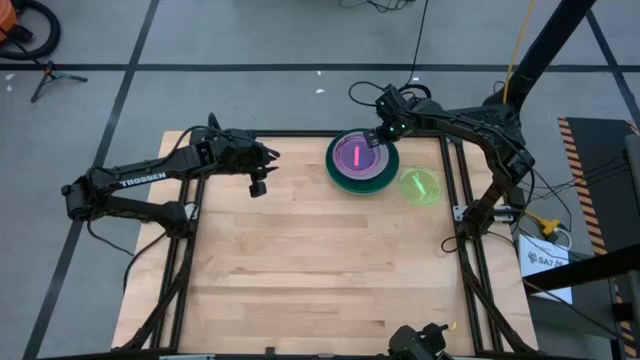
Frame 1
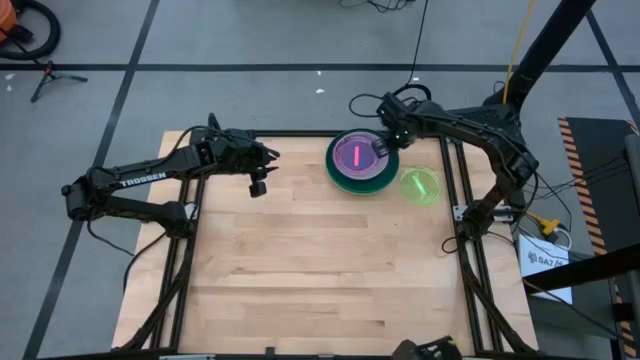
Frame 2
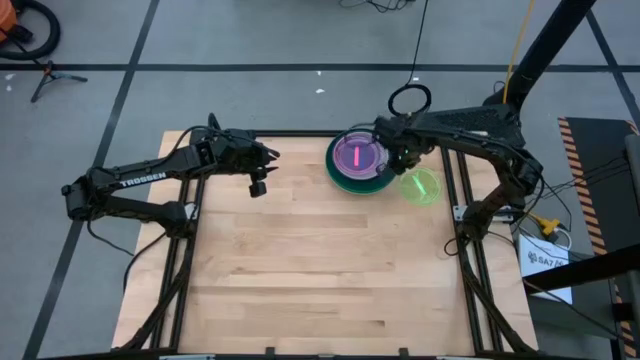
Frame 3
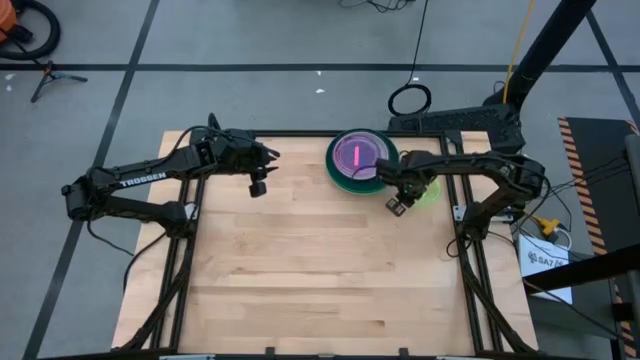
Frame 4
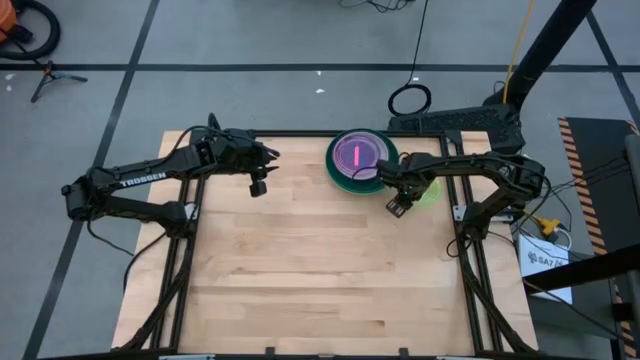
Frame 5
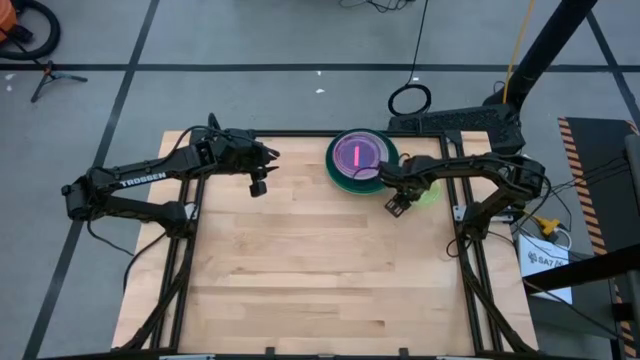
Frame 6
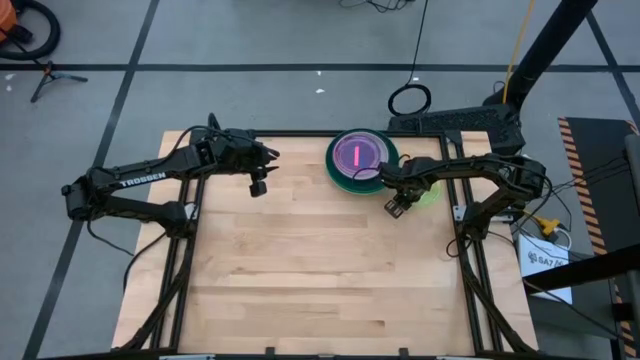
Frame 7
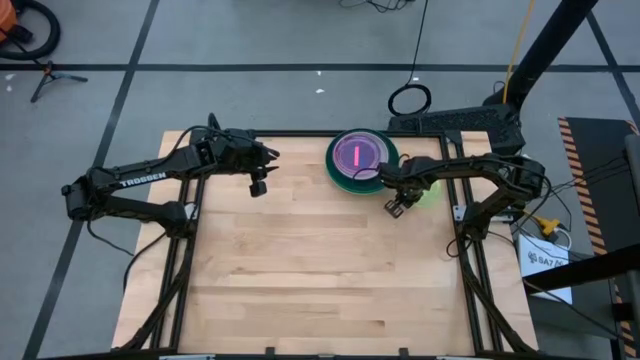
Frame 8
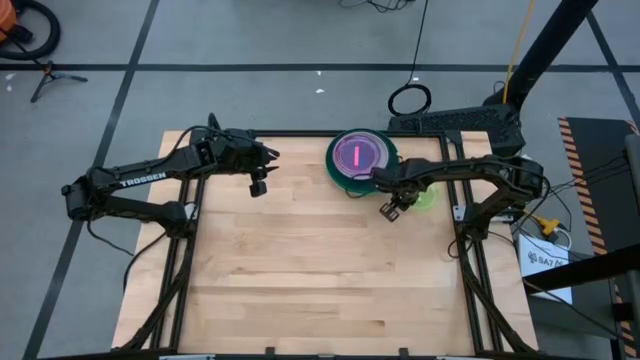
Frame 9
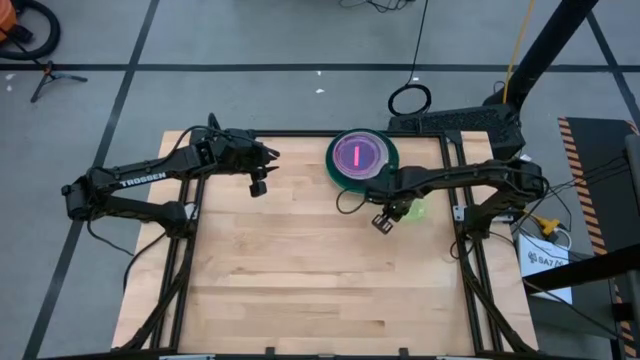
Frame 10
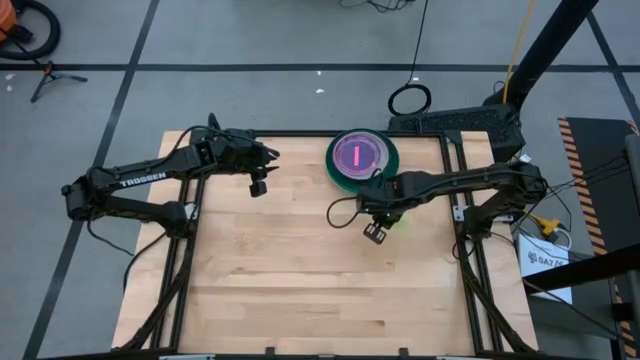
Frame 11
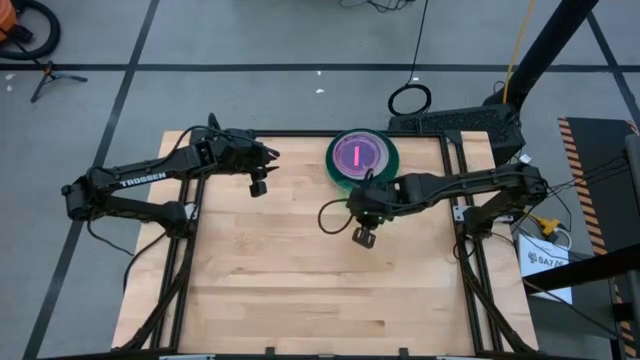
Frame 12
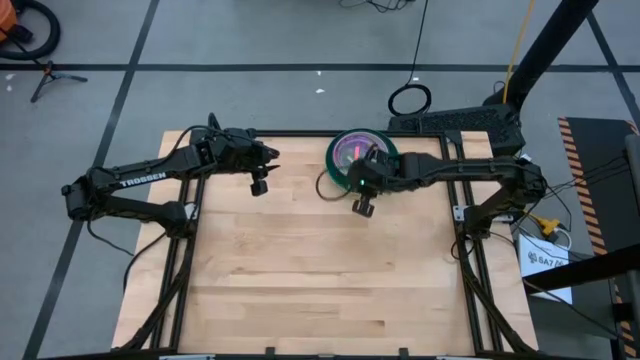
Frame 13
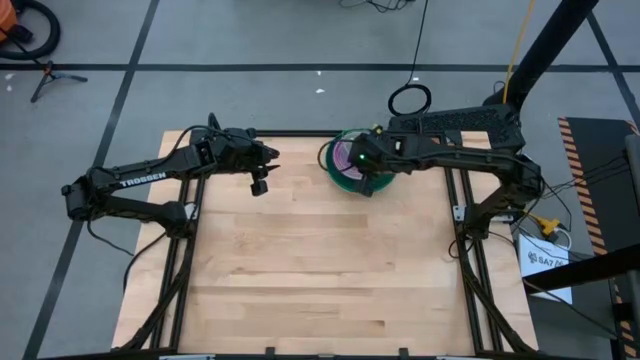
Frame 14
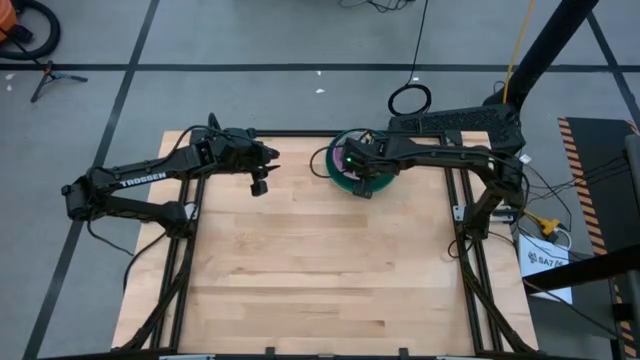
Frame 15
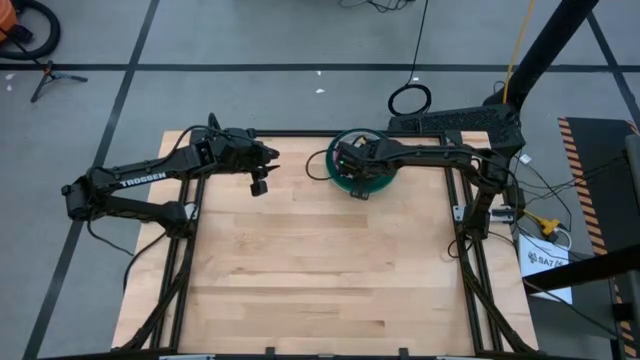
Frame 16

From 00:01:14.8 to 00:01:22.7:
Task: Stack plastic plates
Stack the light green plate on top of the pink plate

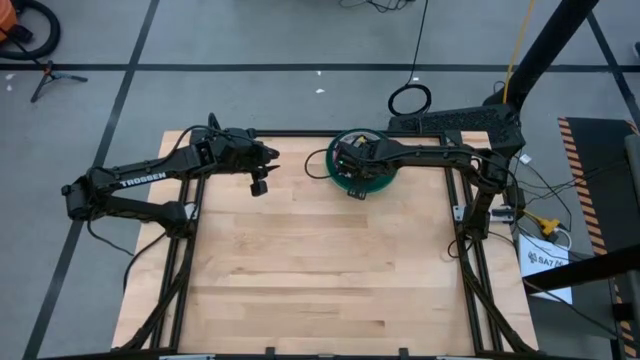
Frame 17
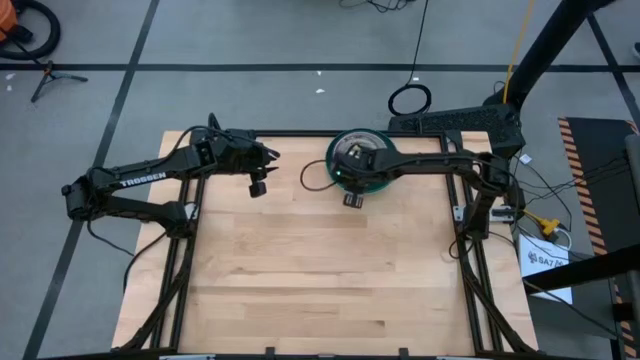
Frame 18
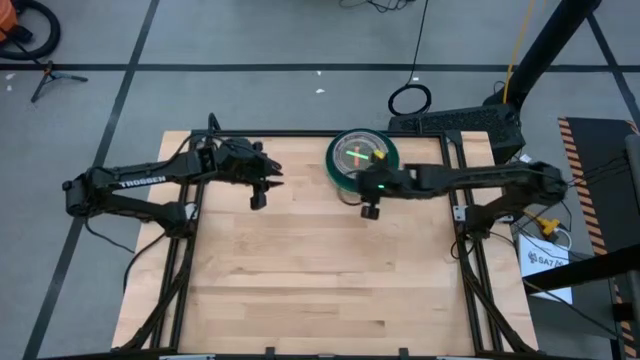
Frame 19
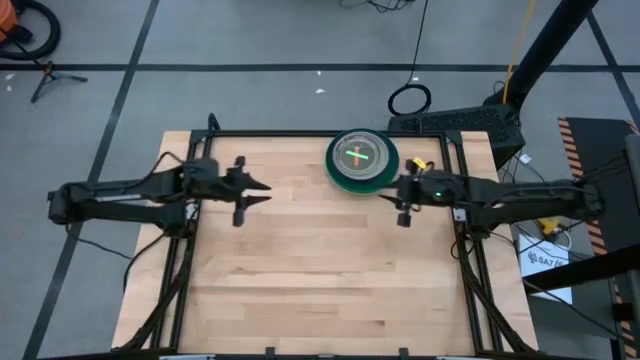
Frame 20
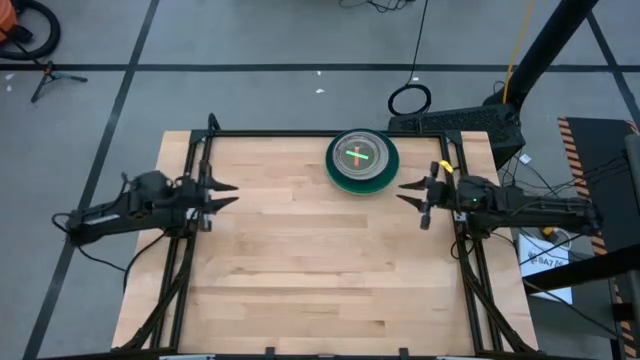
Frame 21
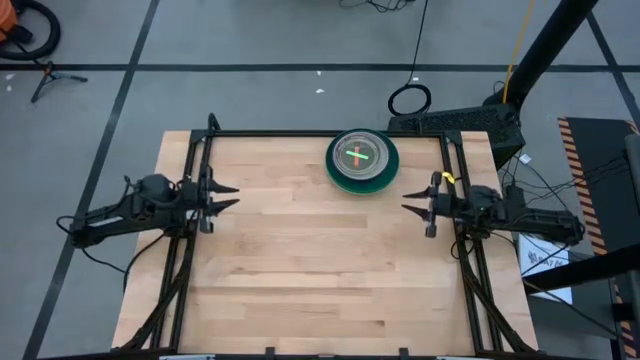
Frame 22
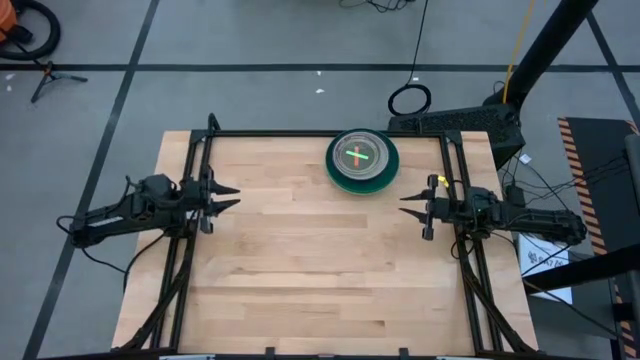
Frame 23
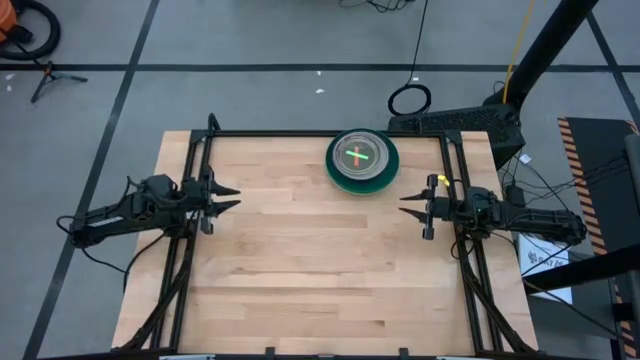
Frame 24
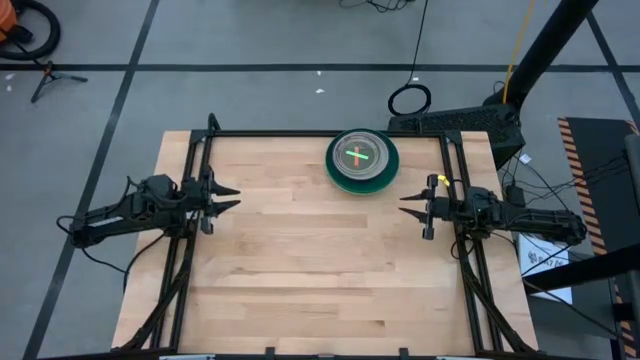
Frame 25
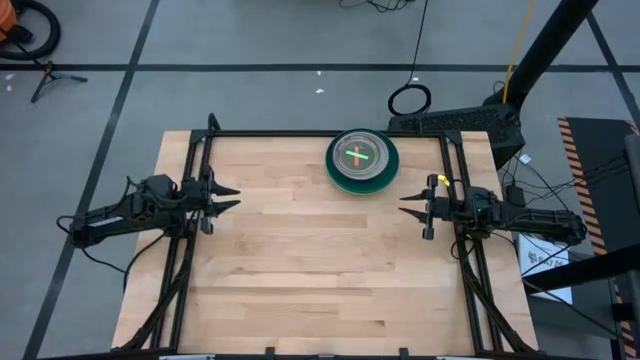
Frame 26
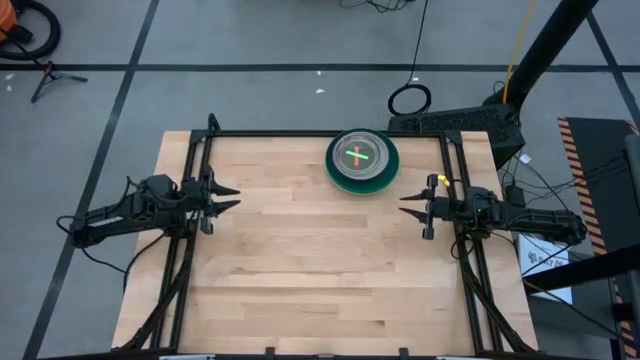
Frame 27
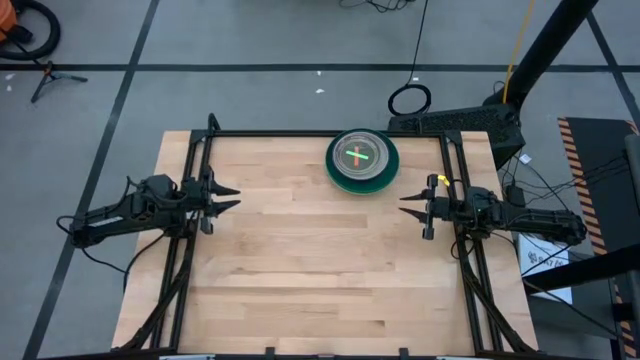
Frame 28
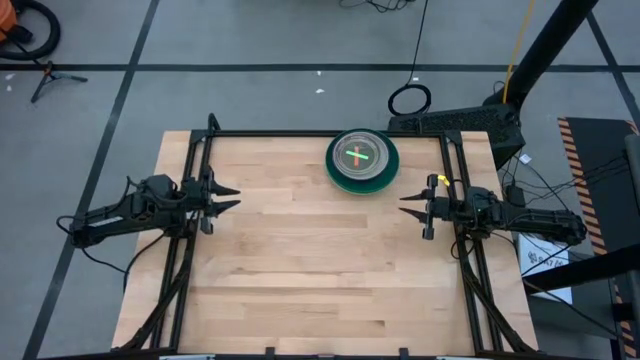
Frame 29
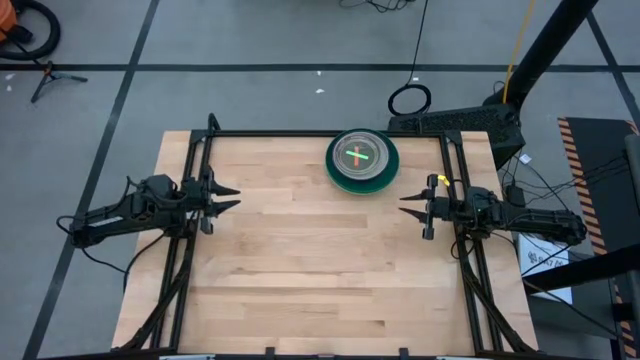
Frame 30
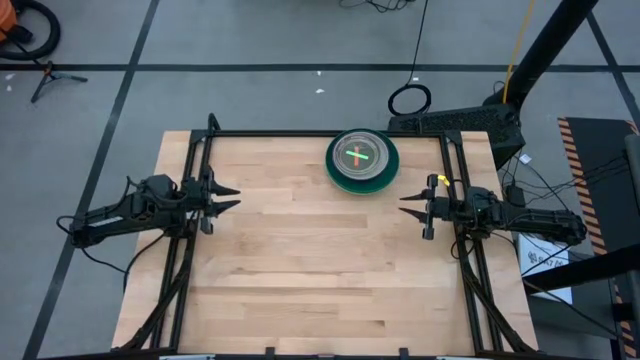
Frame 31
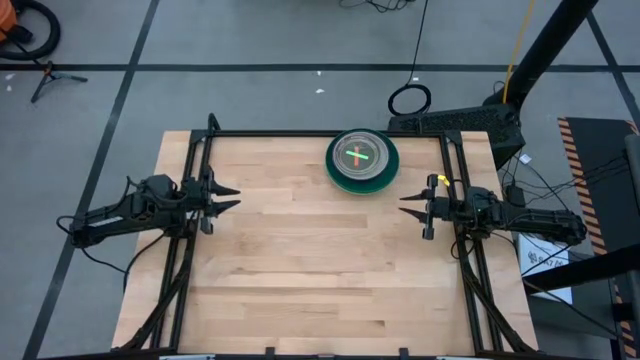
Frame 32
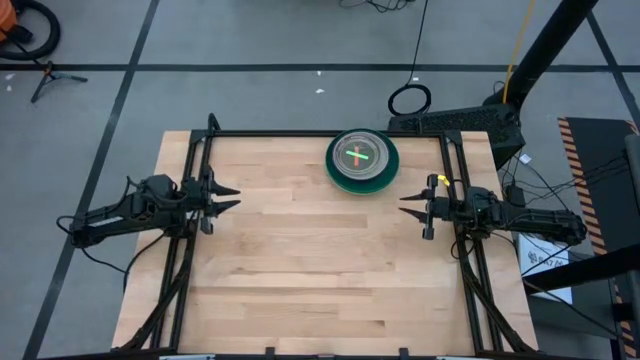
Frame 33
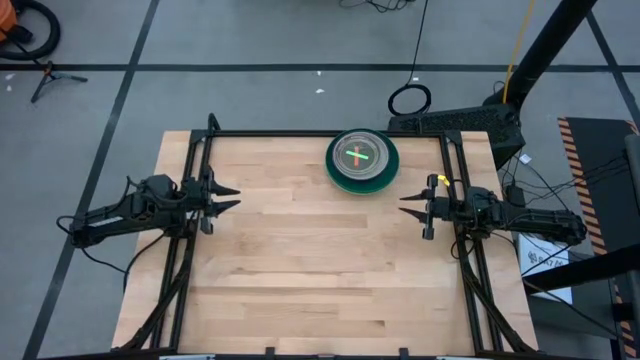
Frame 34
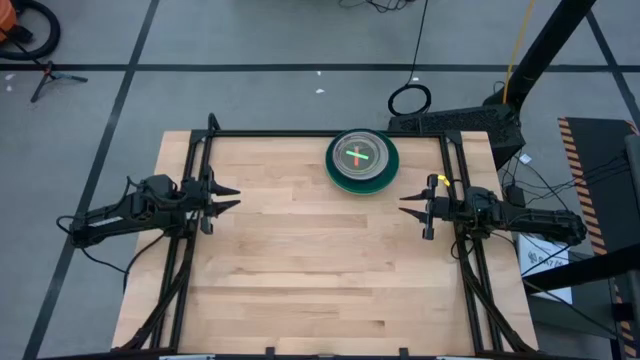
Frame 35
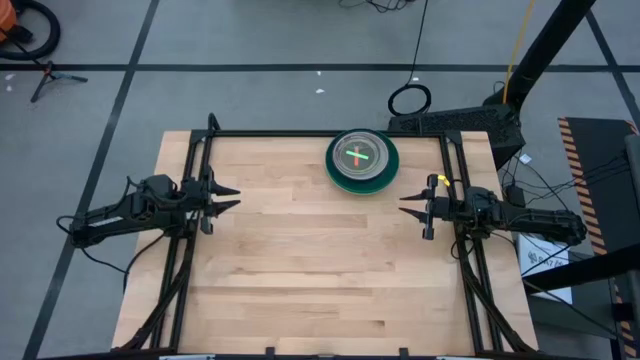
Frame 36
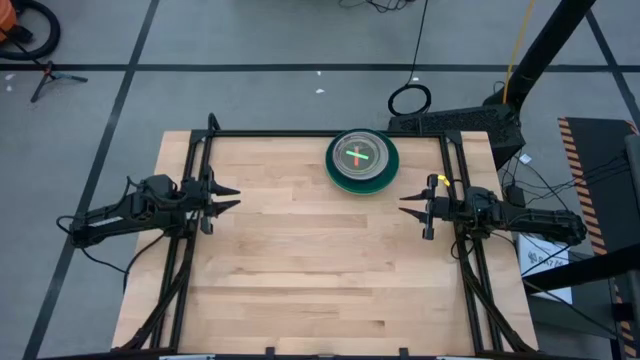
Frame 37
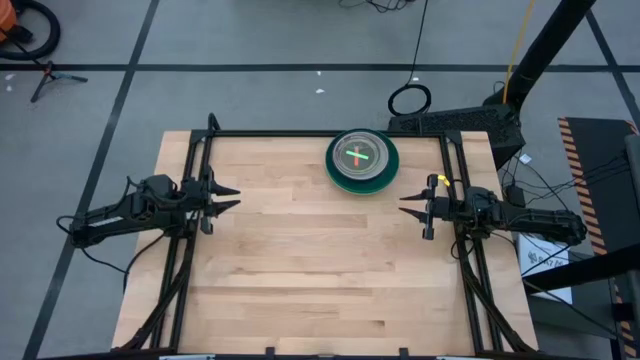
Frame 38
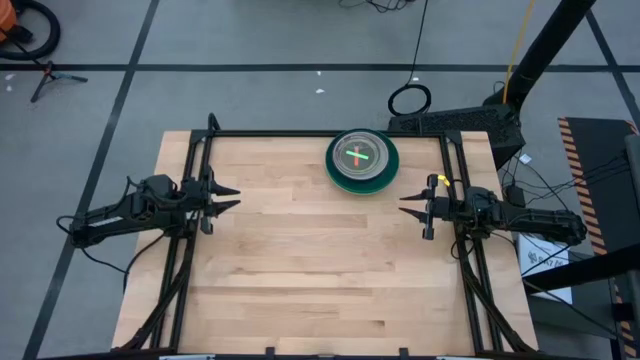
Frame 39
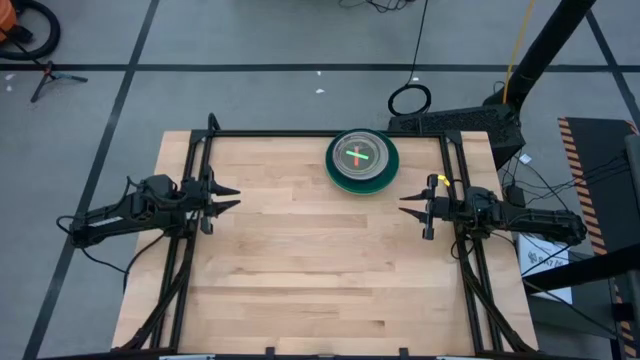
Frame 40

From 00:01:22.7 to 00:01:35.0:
Return to Home Position

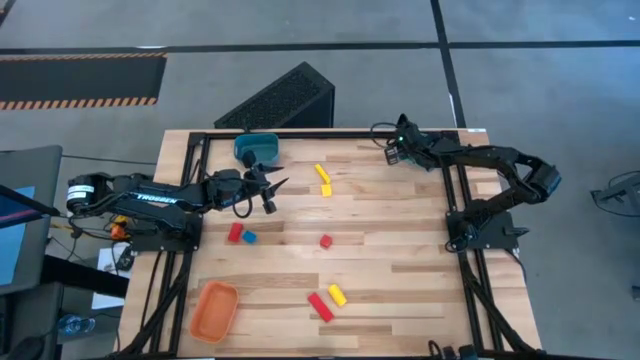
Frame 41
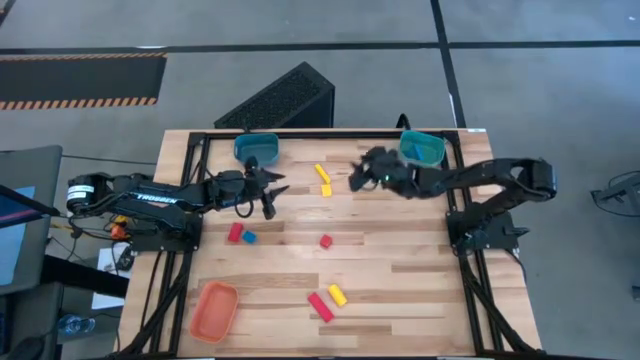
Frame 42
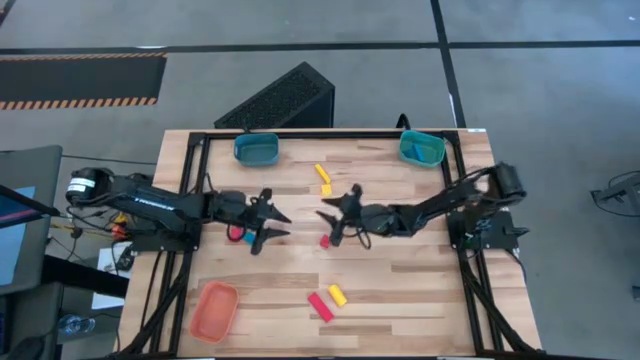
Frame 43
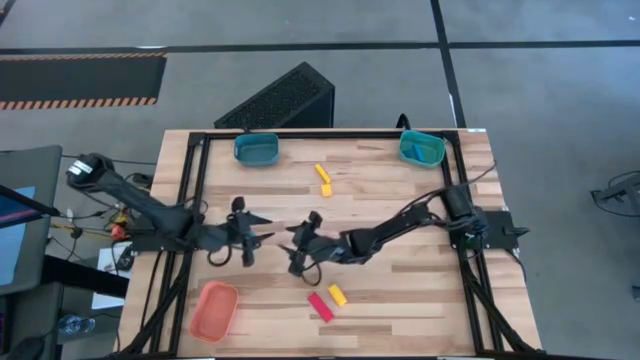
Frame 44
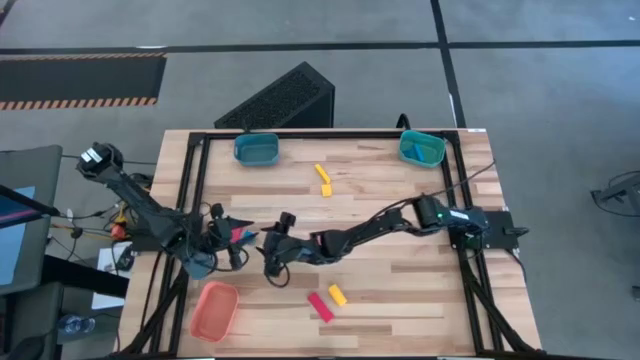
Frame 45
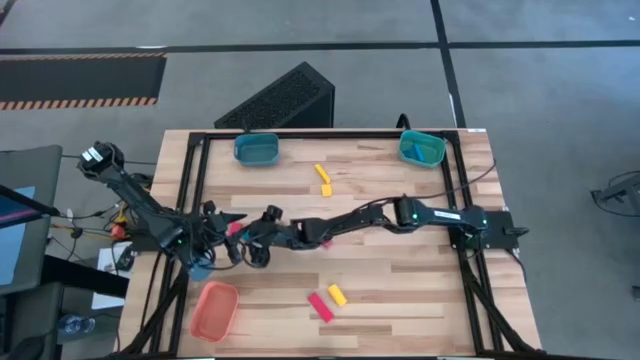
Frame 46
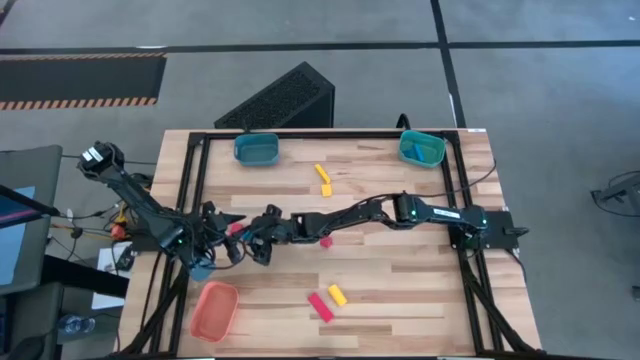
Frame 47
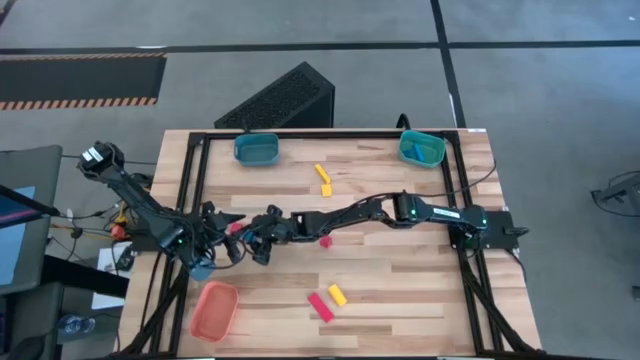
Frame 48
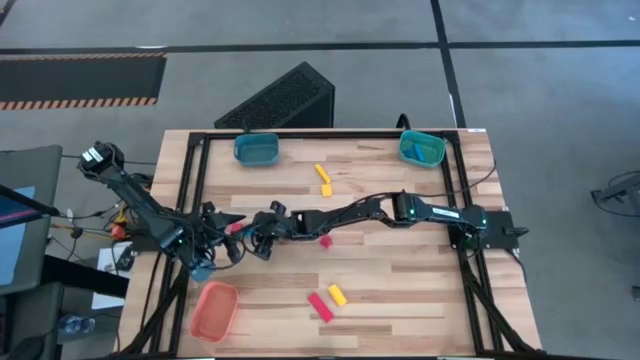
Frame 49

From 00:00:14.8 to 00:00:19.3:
Task: Sort & place blocks by color
Put the blue block into the green bin
